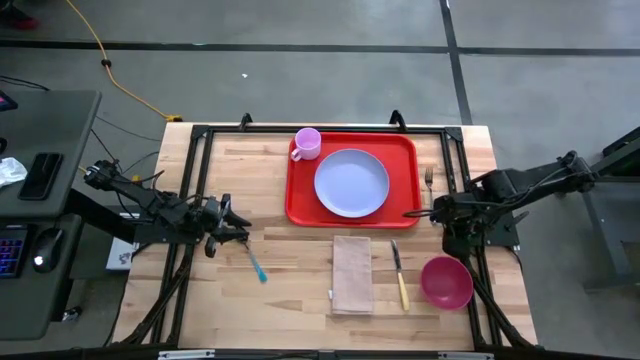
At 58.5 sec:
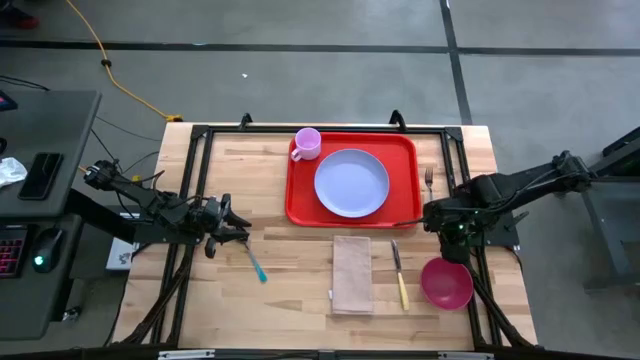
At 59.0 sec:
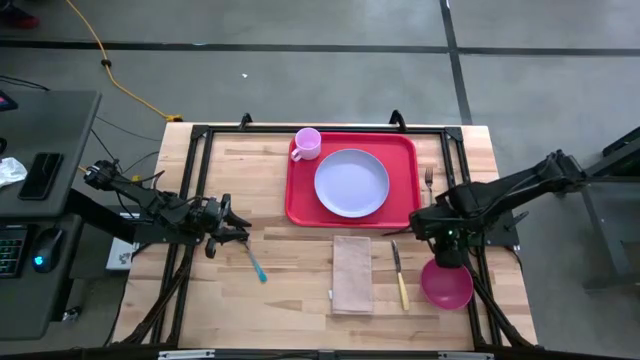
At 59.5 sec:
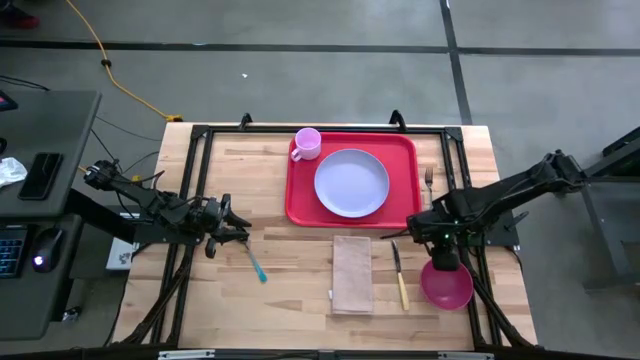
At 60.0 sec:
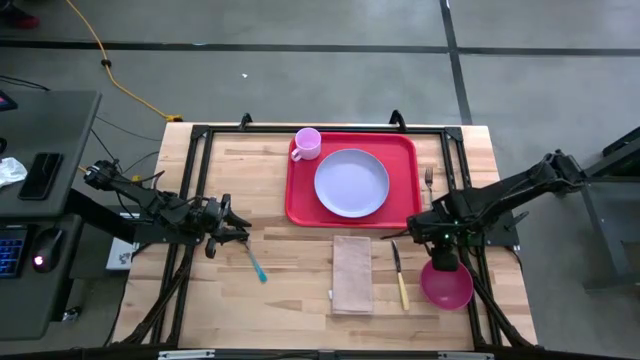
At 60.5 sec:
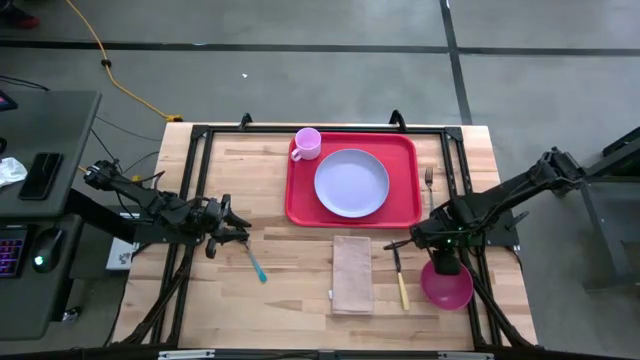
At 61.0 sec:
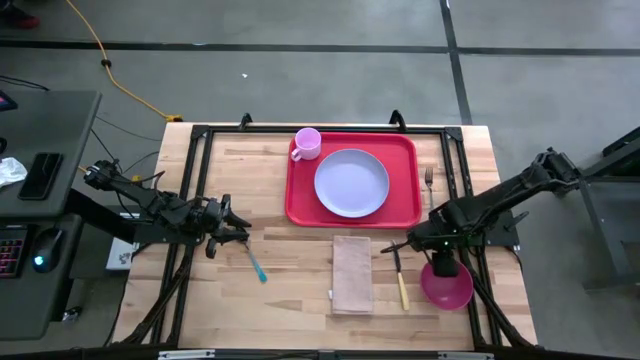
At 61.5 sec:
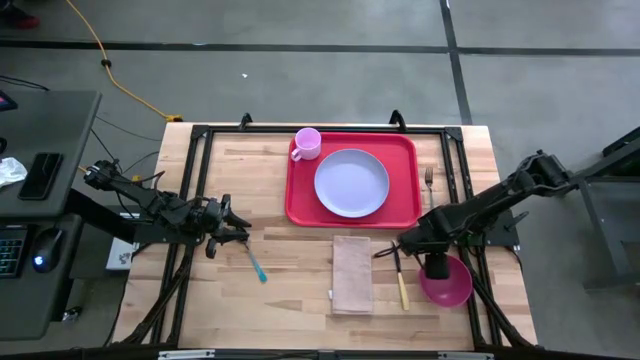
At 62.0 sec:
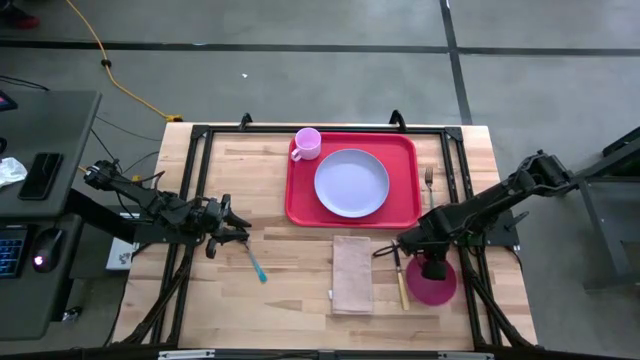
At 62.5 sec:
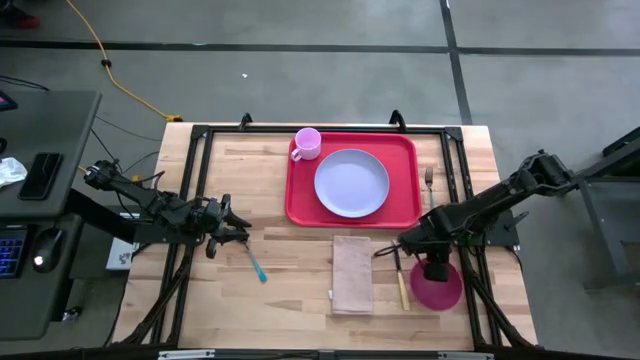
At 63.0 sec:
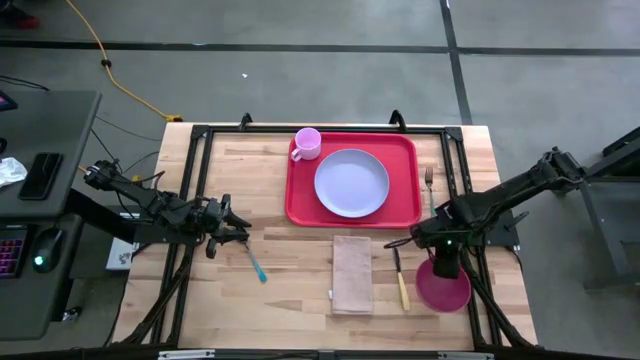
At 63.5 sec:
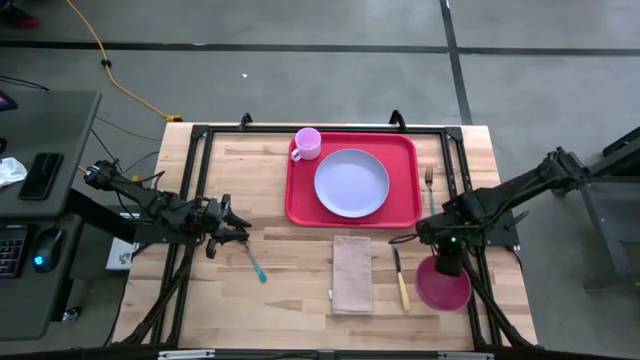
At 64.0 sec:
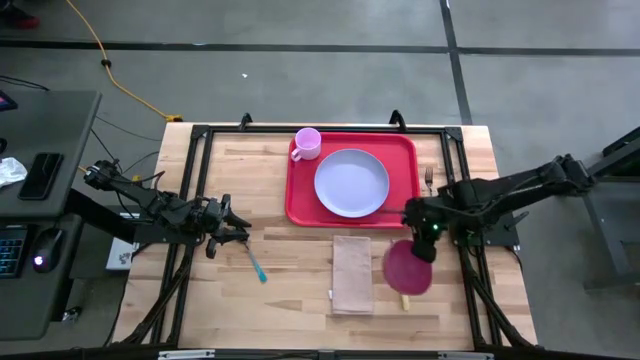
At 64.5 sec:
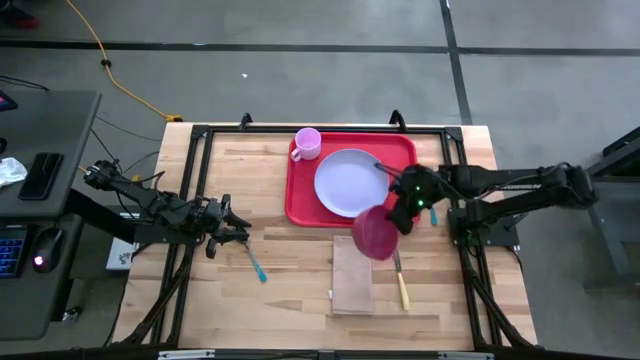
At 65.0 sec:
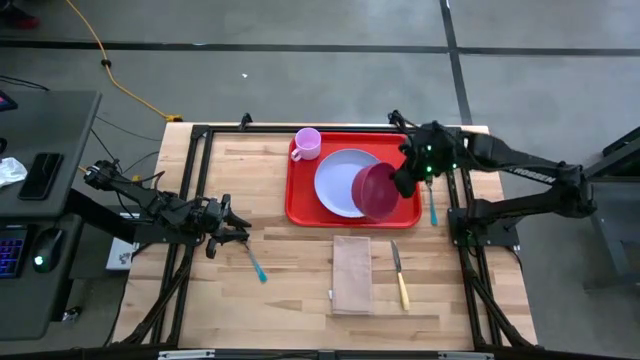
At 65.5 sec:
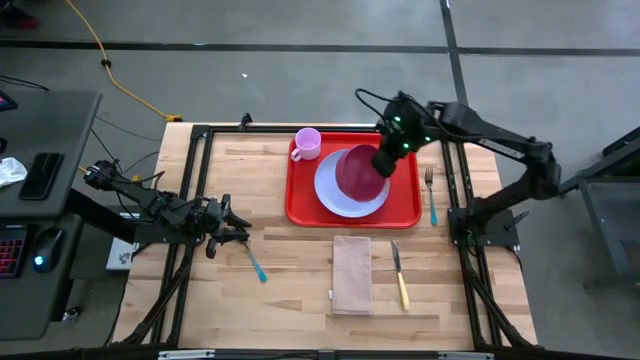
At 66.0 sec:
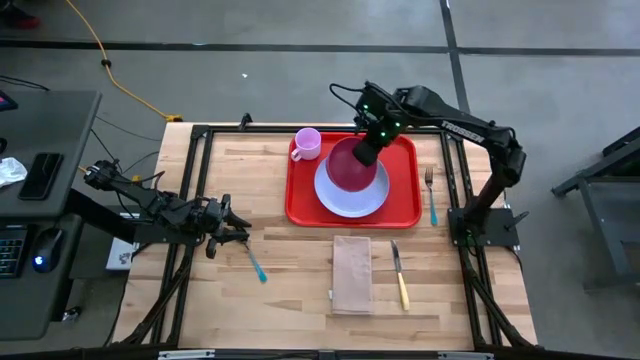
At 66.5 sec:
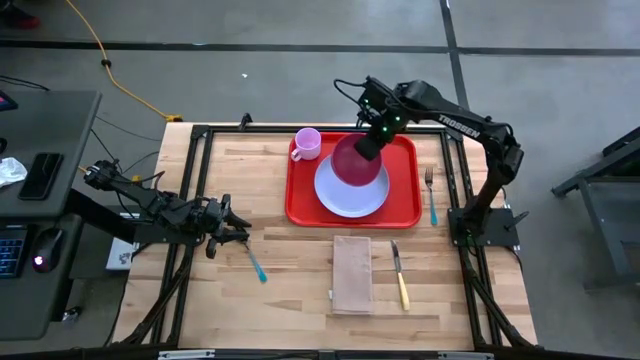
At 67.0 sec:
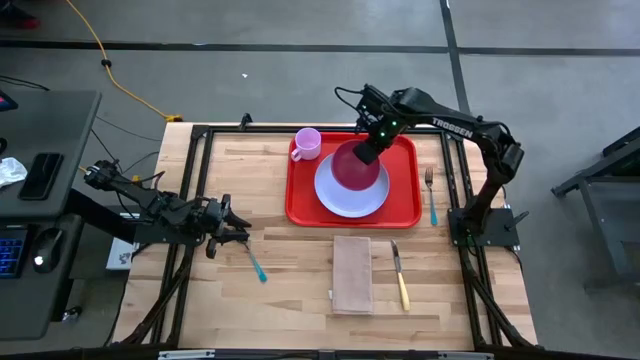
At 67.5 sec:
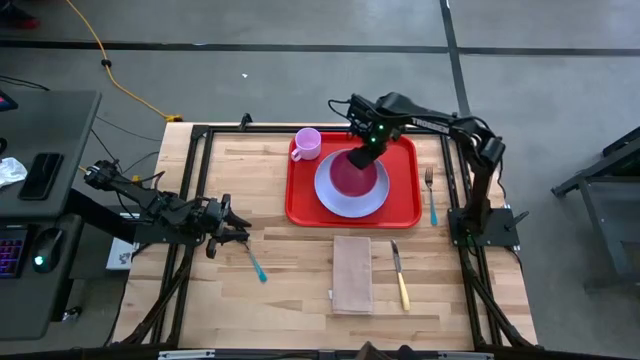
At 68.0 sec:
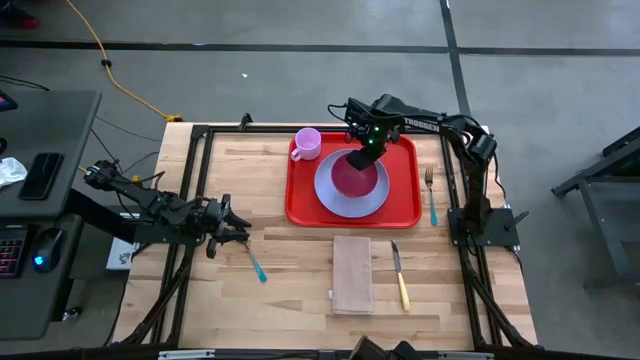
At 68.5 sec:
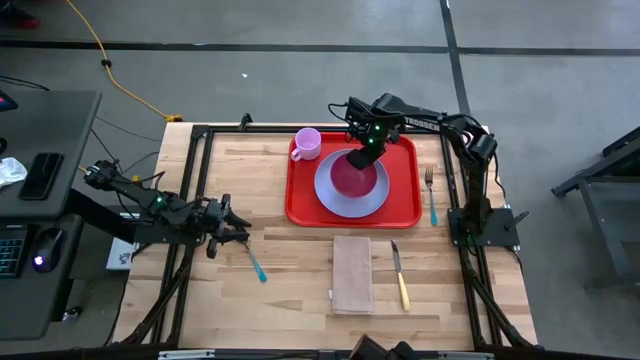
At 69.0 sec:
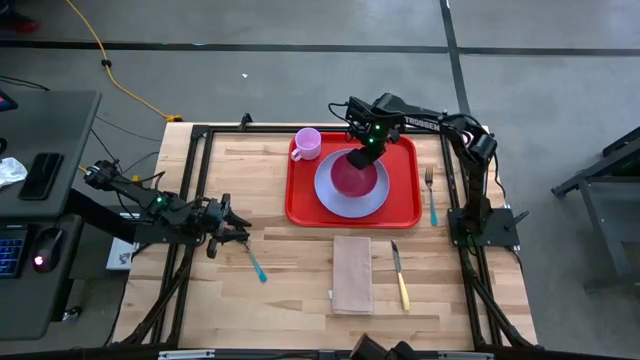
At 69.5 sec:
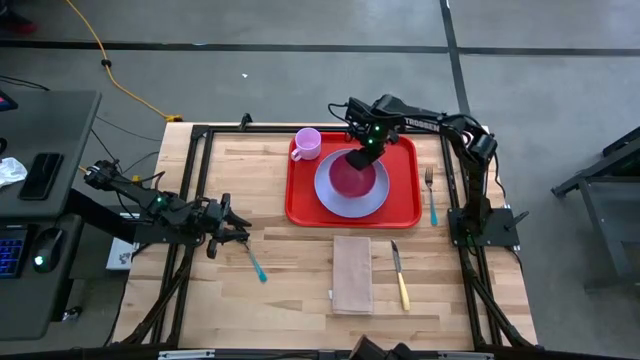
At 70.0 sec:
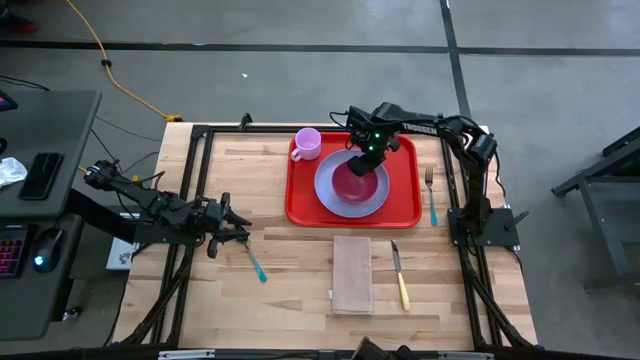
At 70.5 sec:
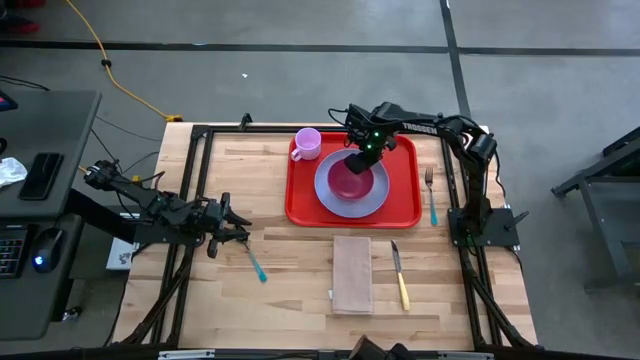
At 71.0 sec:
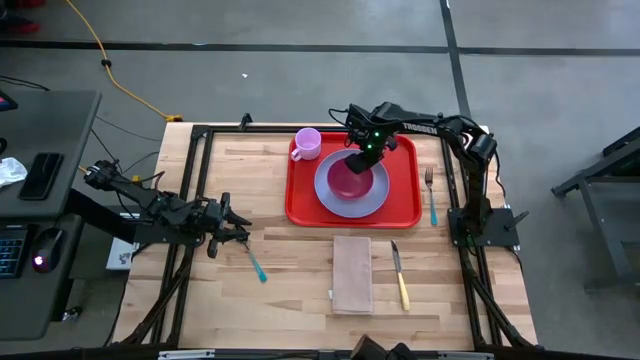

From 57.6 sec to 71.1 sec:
Task: Set up tray
Put the red bowl on the blue plate on the red serving tray

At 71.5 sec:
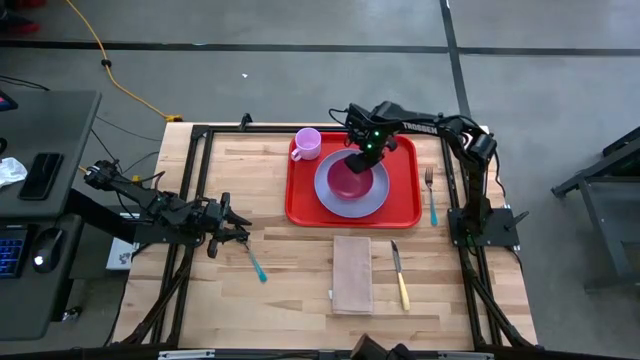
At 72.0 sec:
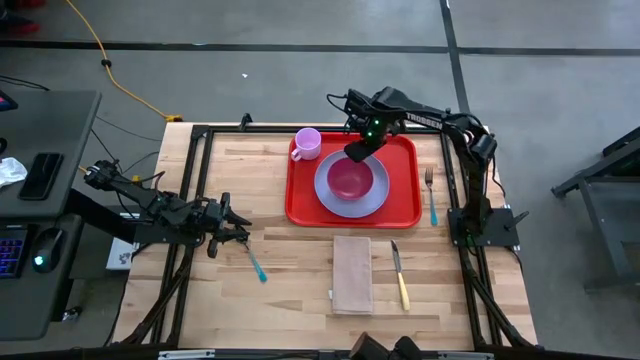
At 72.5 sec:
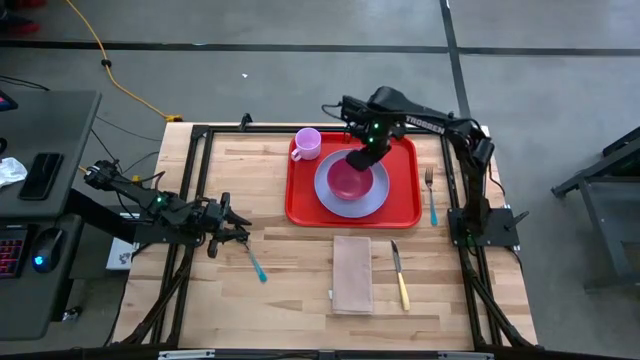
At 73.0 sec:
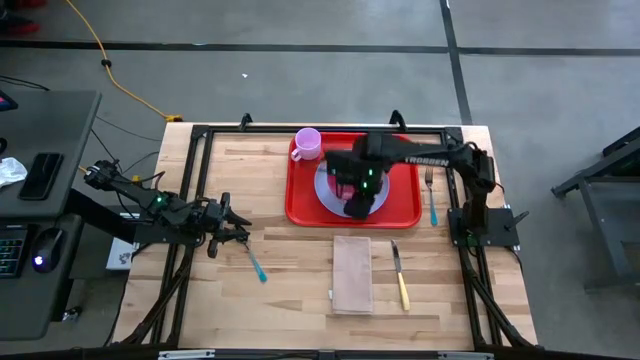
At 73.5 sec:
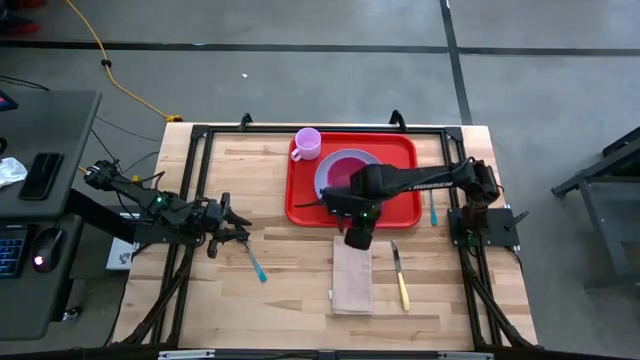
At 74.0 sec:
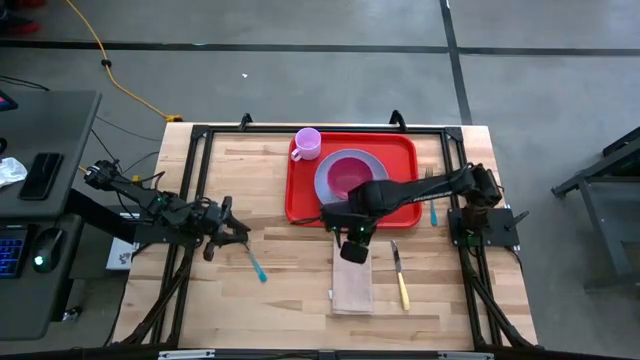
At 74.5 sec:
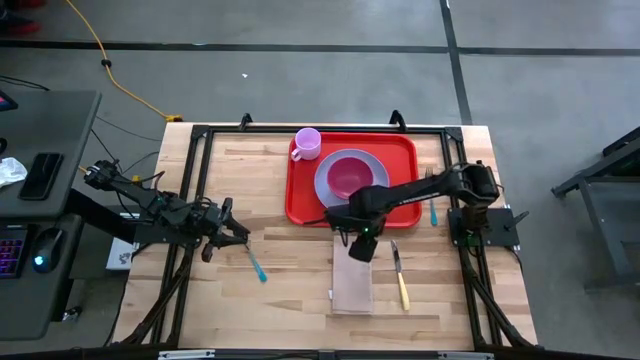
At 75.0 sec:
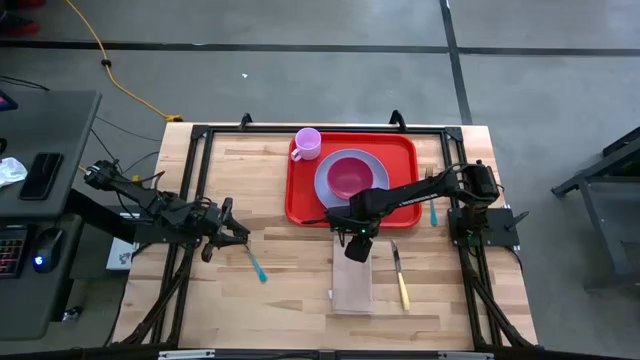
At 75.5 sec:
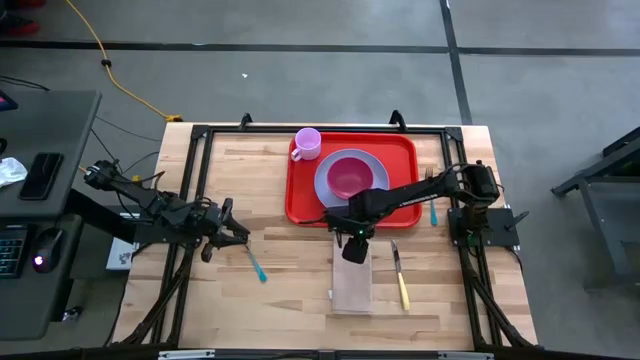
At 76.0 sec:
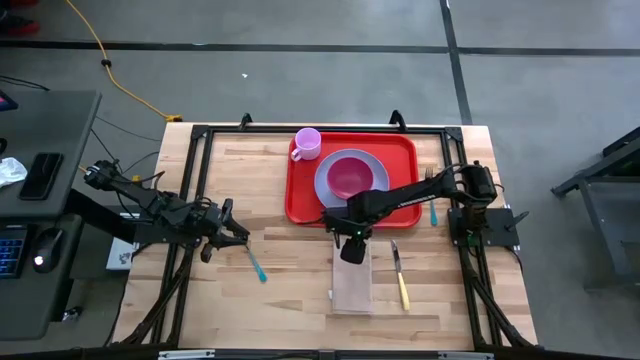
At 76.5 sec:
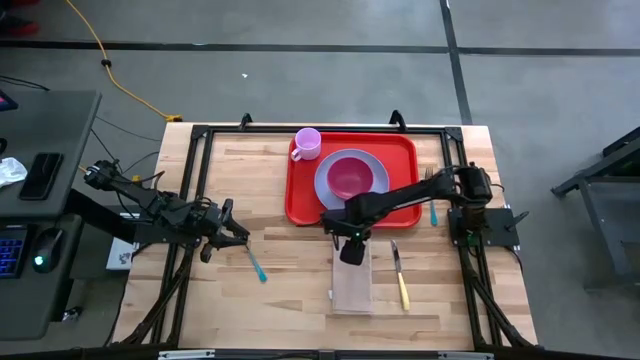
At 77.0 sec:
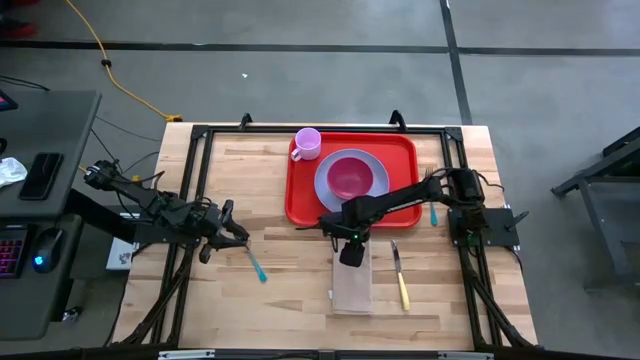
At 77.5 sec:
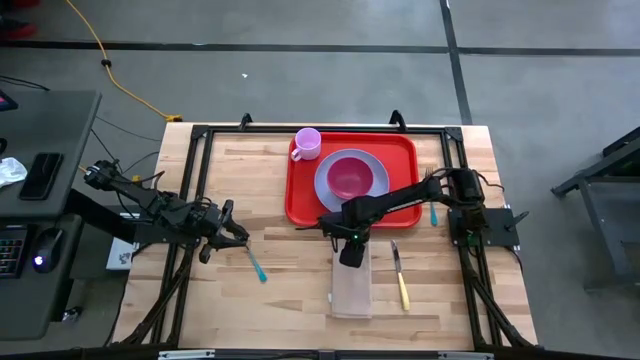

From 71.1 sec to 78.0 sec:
Put the white napkin to the right of the blue plate on the red serving tray
